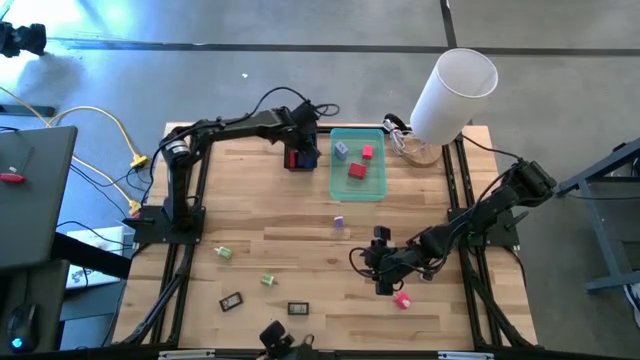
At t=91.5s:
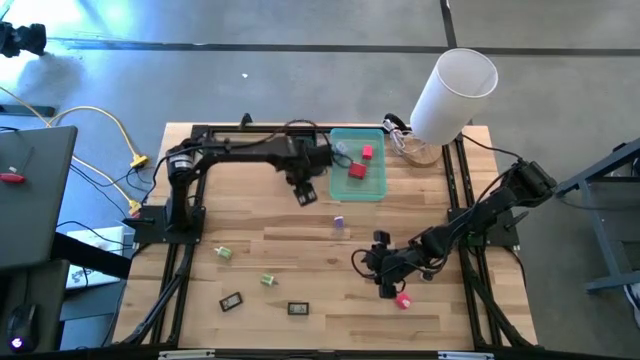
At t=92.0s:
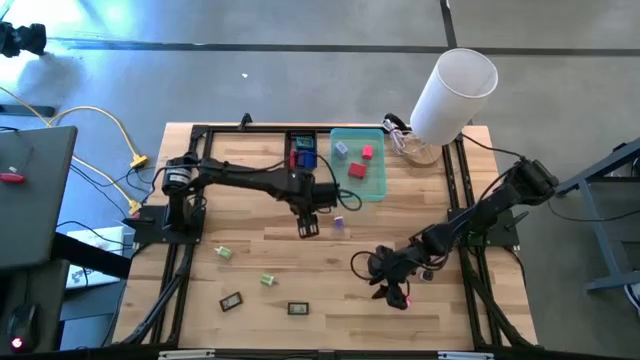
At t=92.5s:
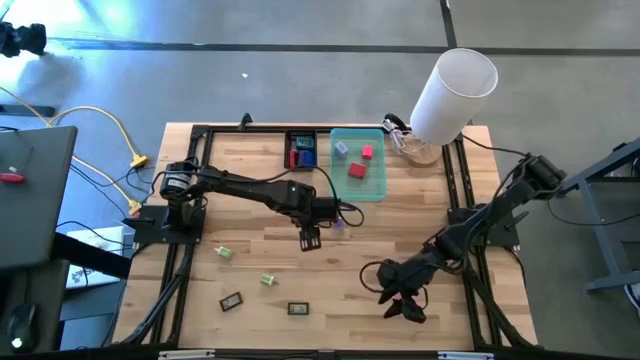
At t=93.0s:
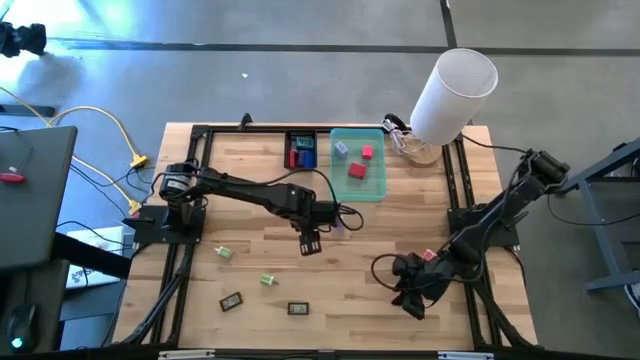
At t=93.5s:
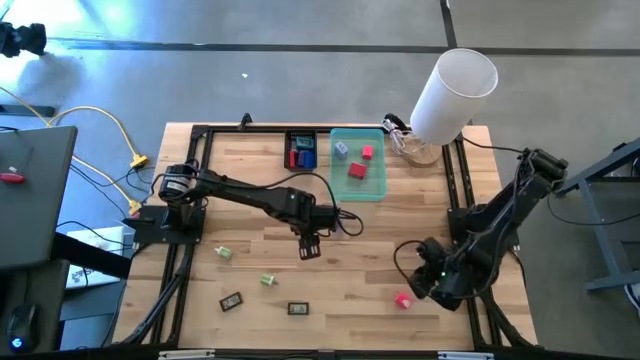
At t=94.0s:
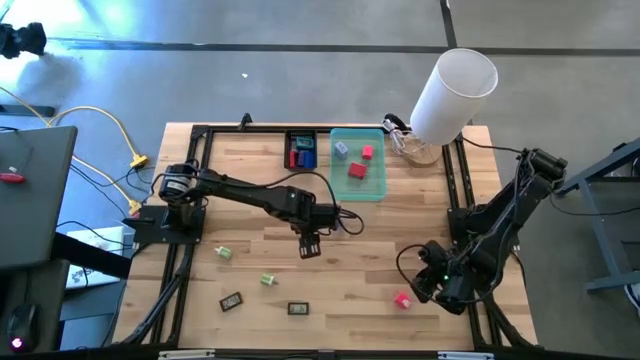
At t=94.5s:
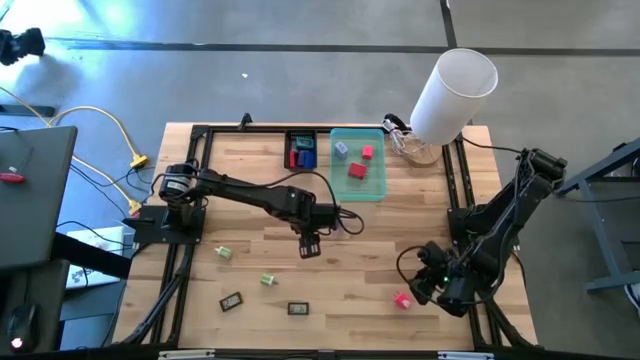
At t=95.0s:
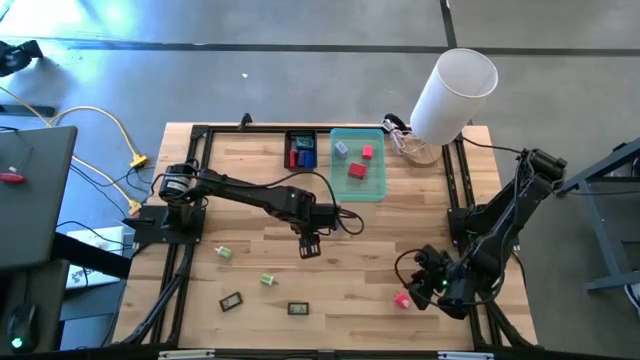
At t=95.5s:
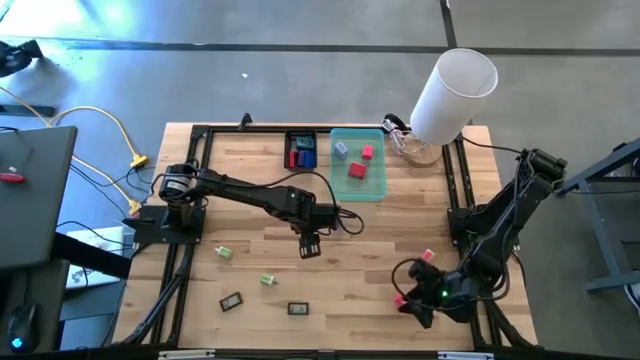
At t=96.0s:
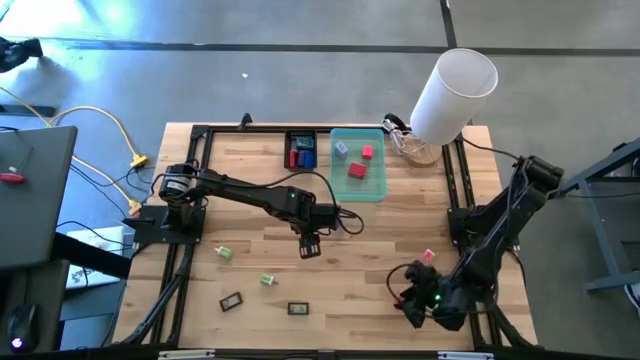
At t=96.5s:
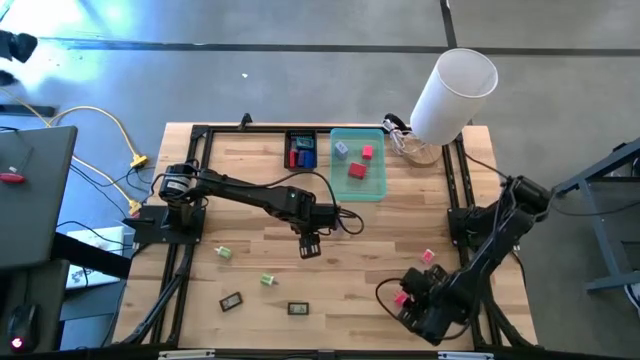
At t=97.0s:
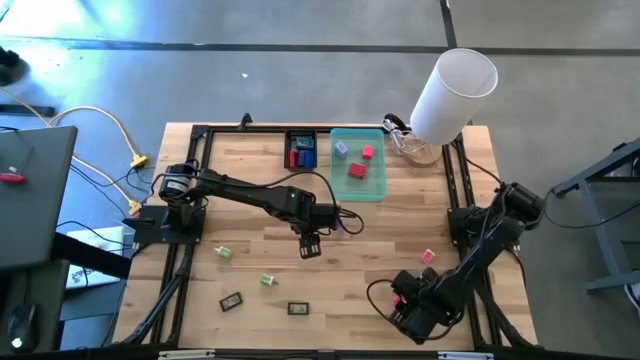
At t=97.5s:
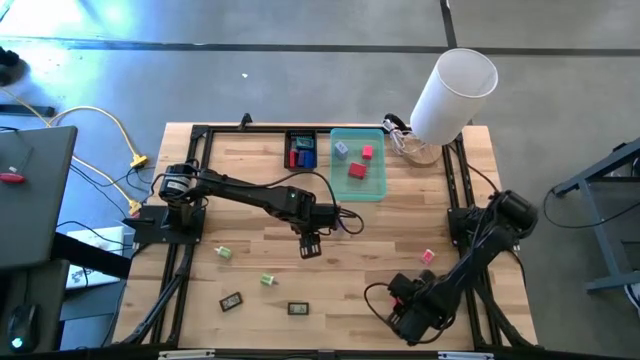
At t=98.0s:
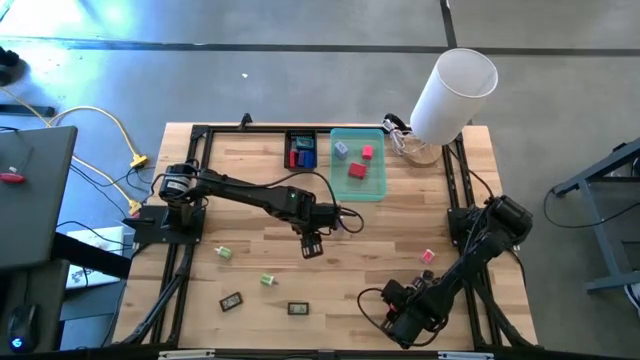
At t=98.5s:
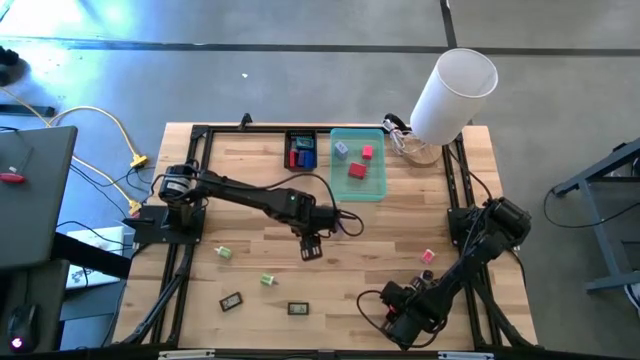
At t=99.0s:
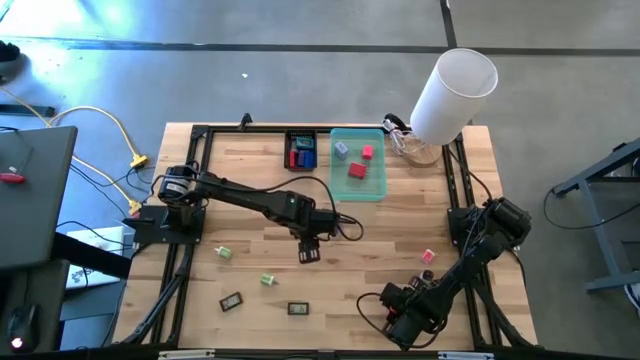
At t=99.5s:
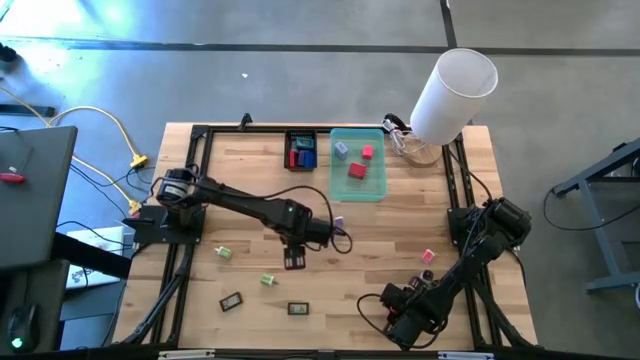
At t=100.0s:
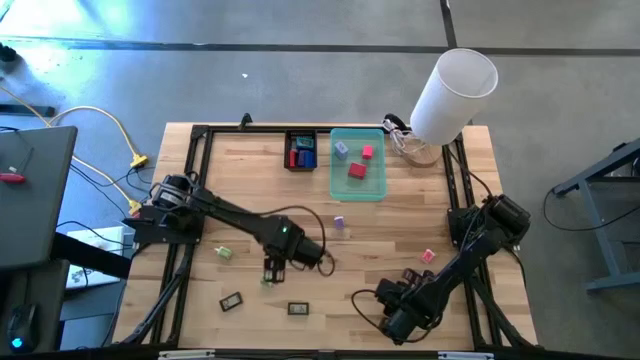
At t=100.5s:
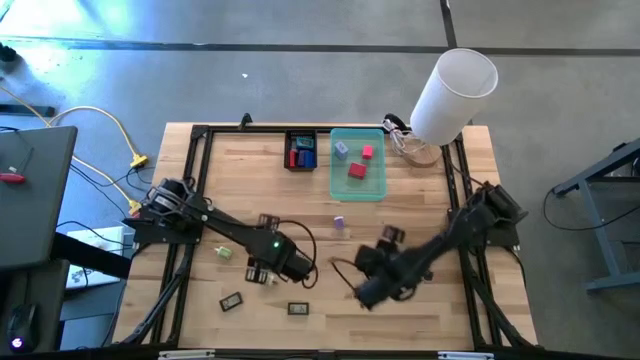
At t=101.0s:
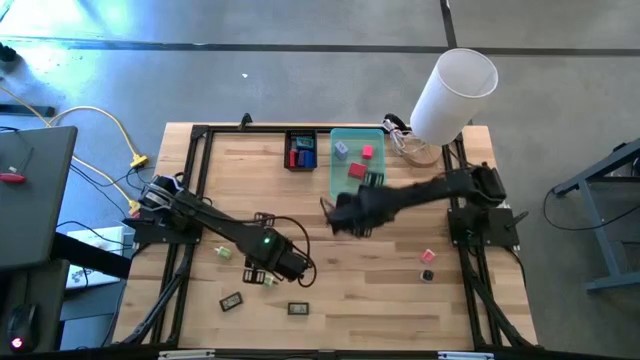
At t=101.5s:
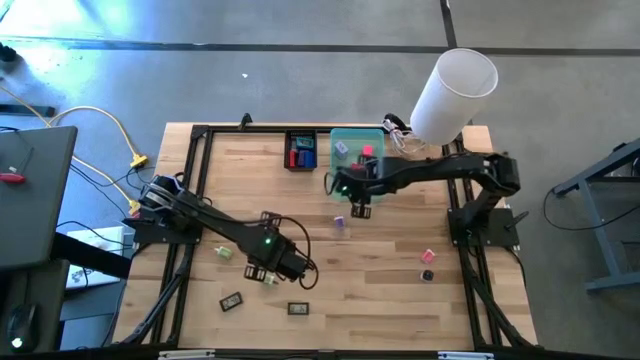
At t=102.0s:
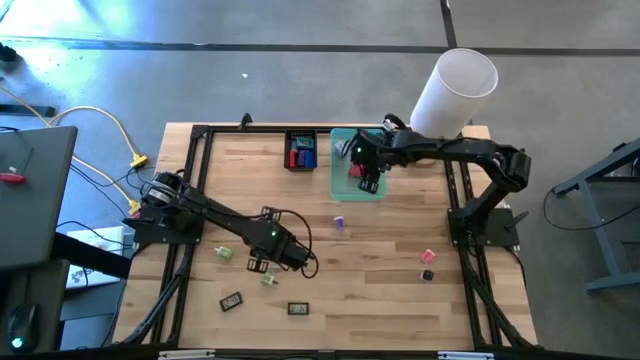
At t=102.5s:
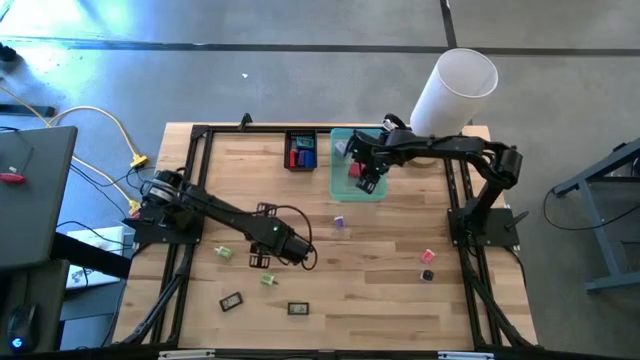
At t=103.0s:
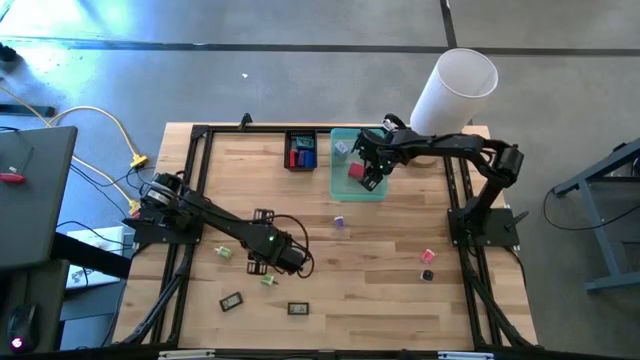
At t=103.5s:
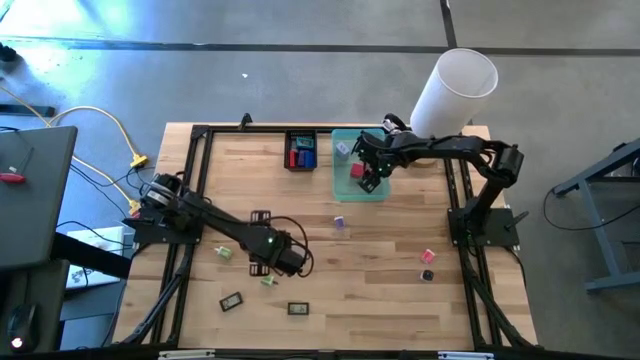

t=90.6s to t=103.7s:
Task: Pick & Place Office items
Put the bottom pink charger adapter into the blue bin

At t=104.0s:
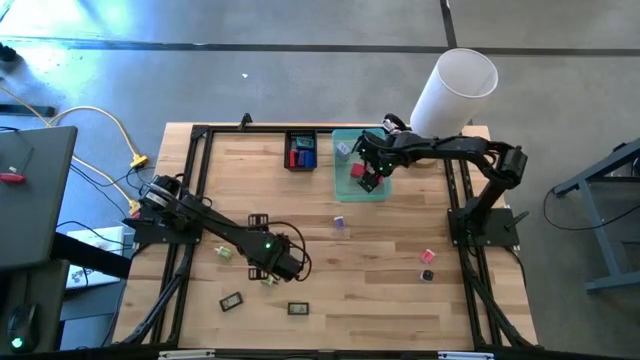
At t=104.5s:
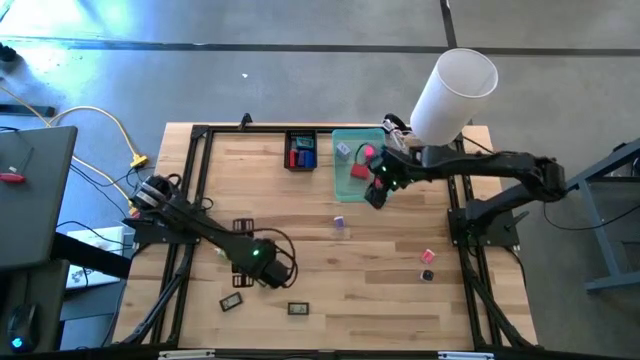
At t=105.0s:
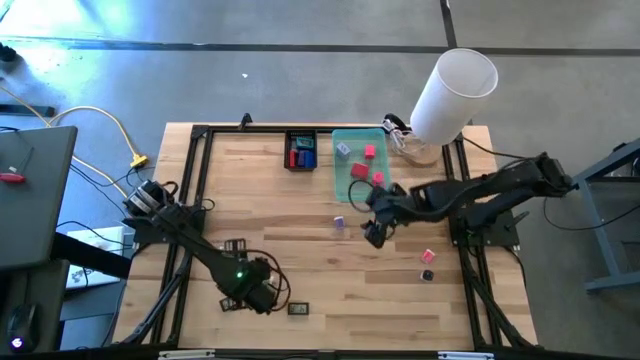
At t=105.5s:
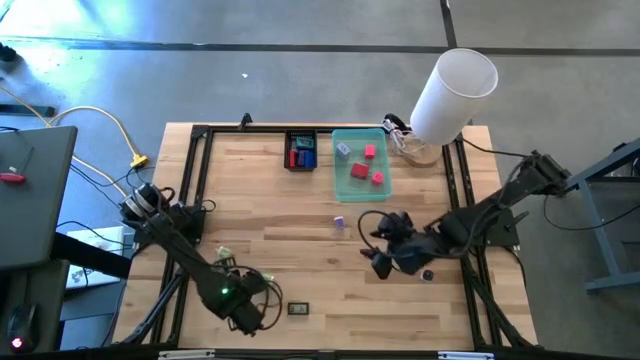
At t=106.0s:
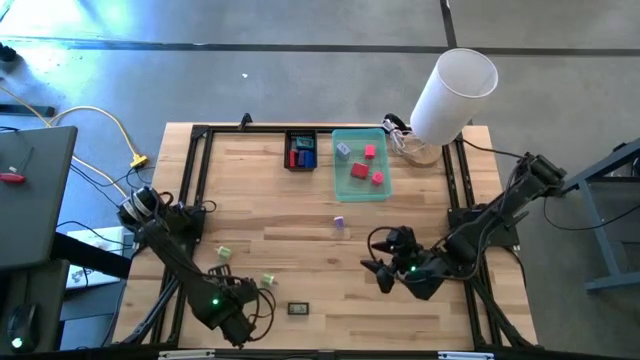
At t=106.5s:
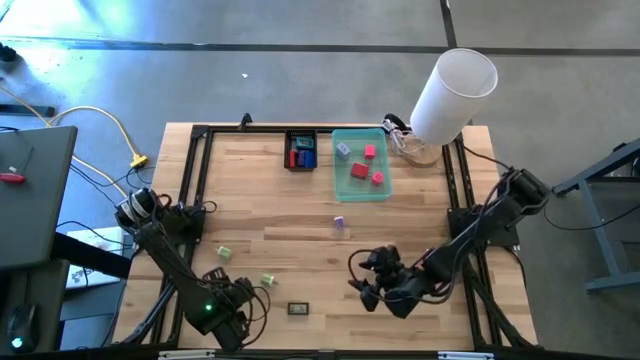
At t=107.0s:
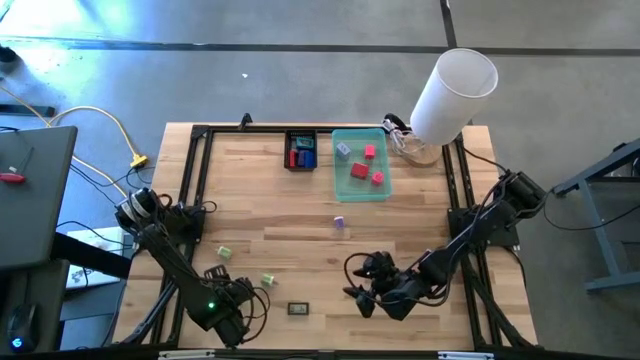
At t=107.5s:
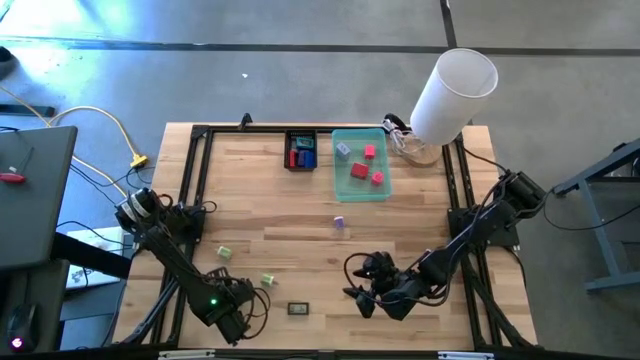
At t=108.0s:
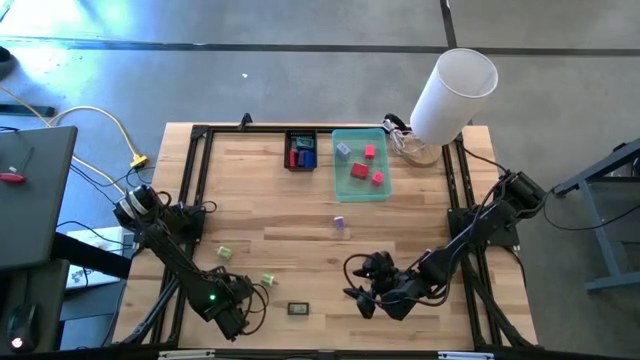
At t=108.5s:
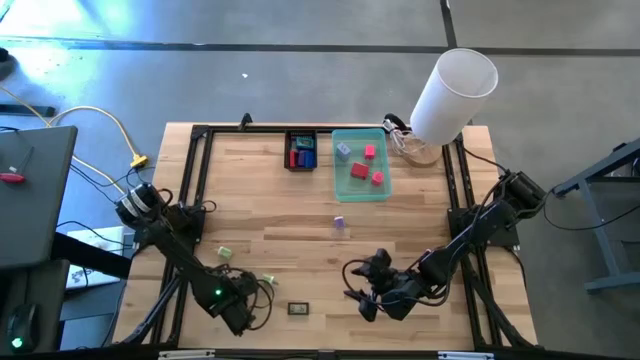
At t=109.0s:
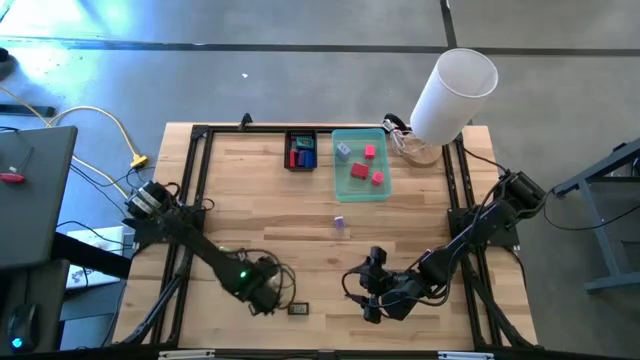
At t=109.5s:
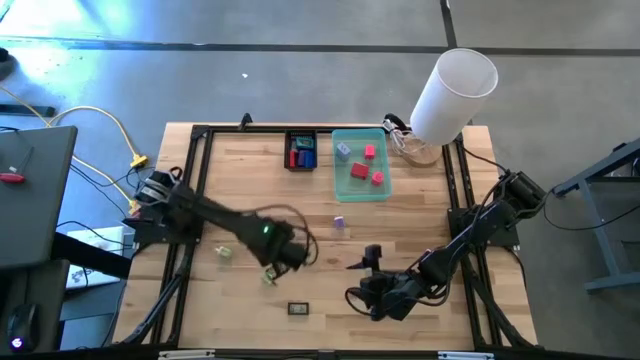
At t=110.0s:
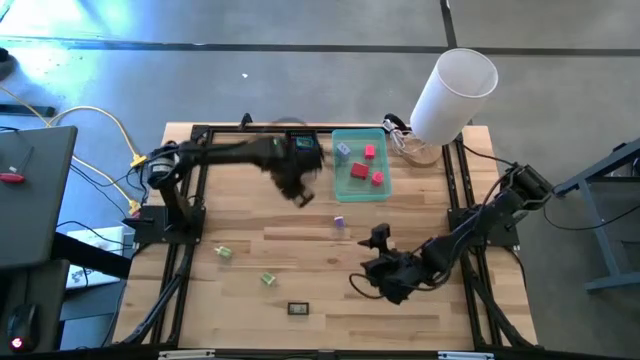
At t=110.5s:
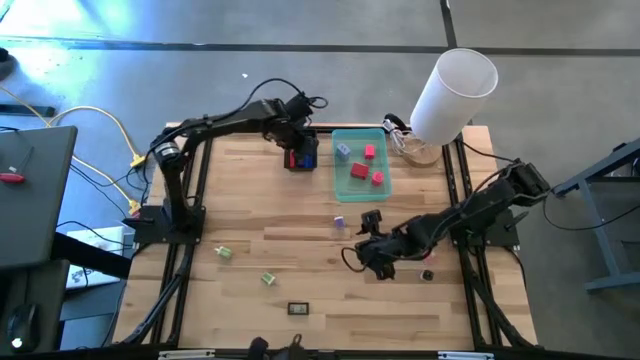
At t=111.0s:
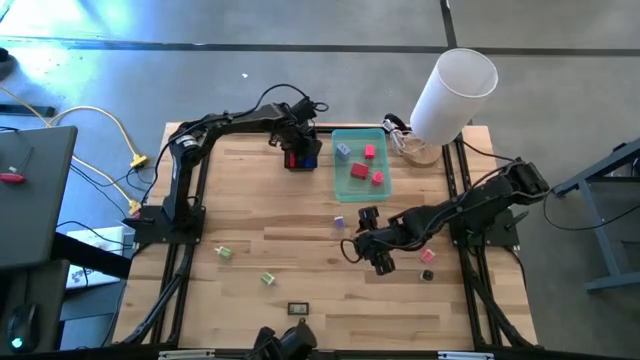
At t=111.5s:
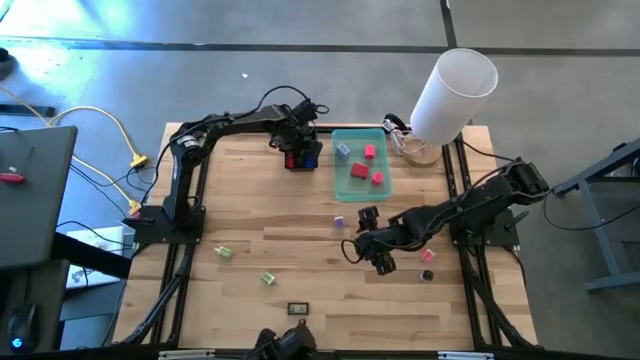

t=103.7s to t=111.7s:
Put the left black digital timer into the black bin
